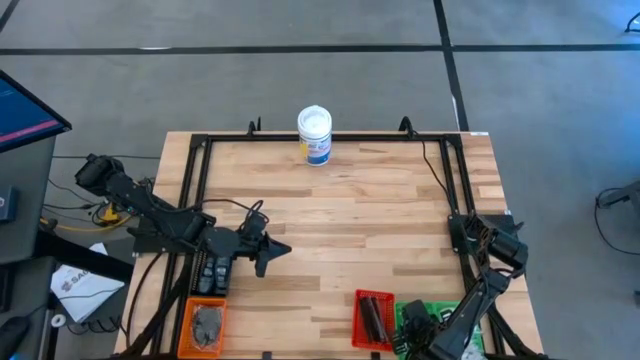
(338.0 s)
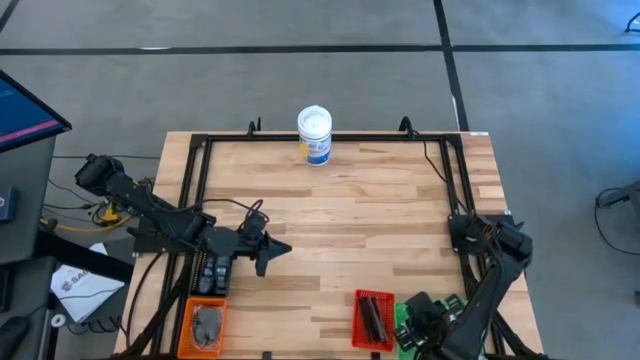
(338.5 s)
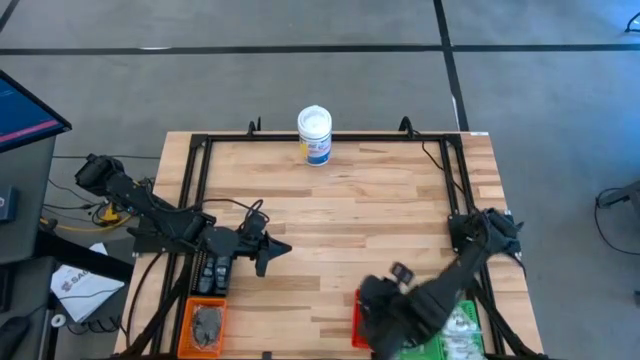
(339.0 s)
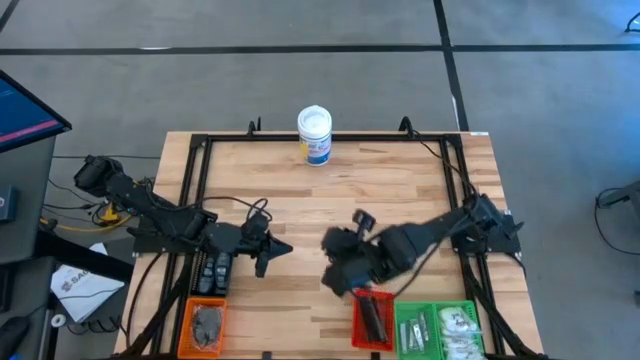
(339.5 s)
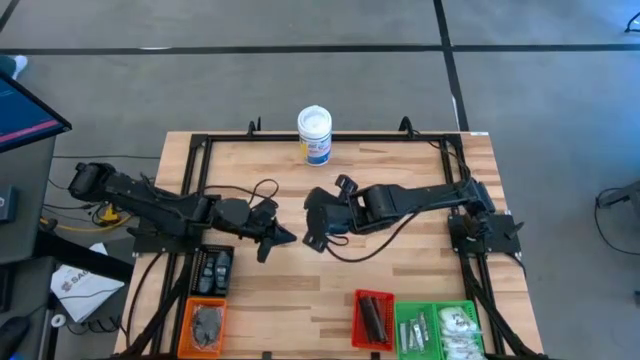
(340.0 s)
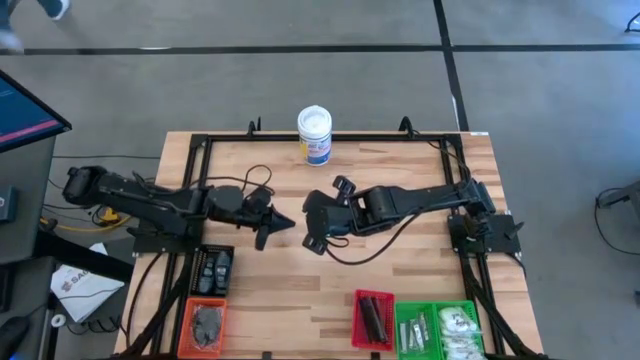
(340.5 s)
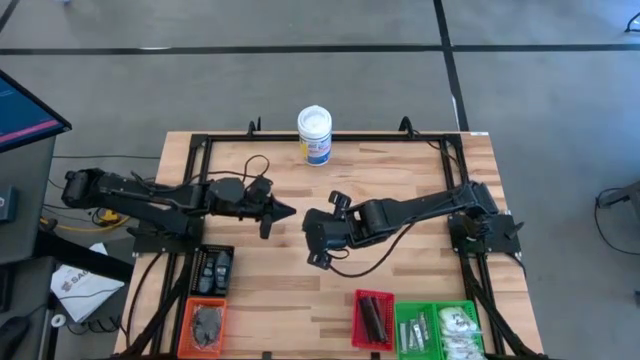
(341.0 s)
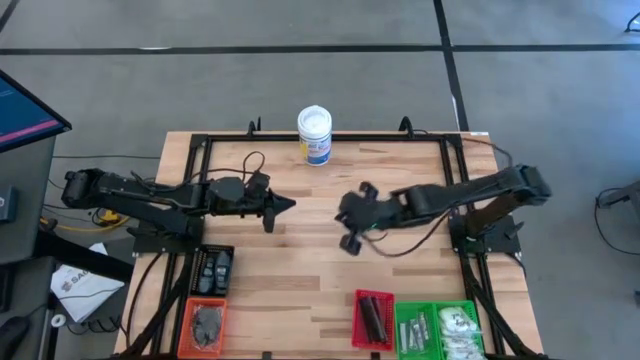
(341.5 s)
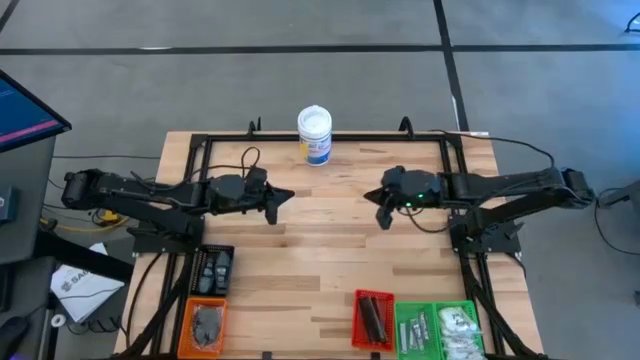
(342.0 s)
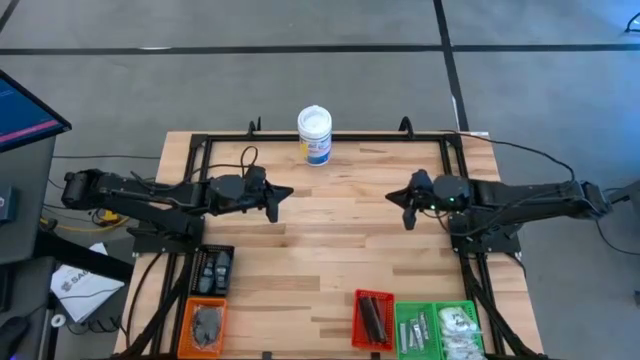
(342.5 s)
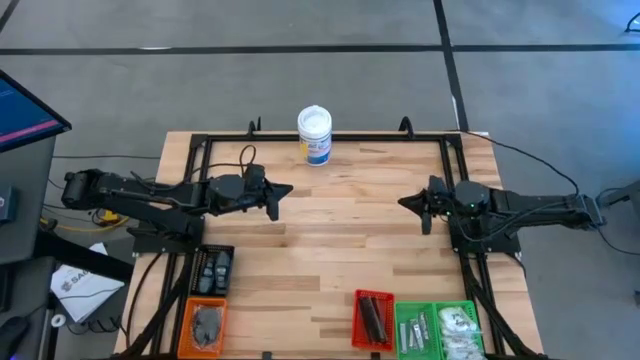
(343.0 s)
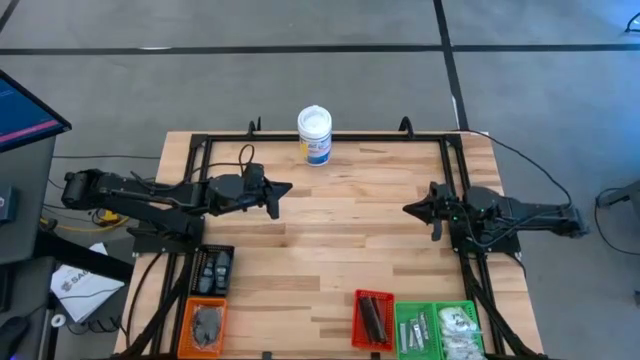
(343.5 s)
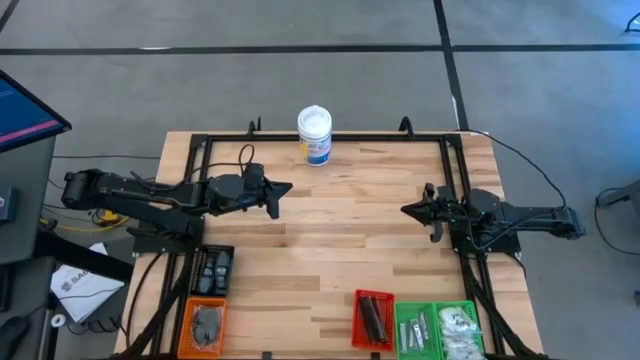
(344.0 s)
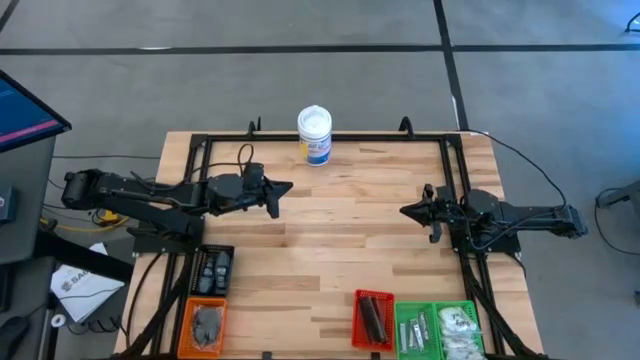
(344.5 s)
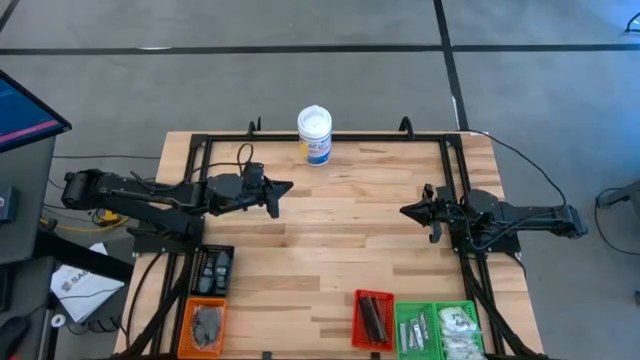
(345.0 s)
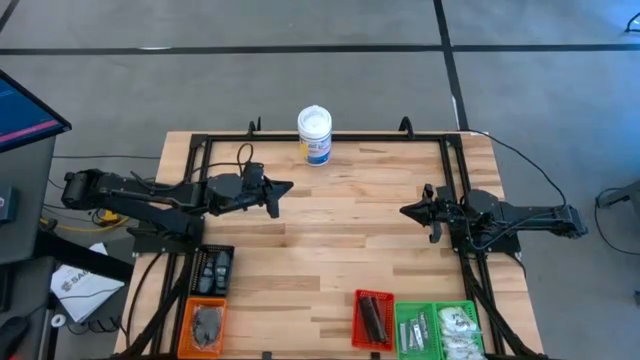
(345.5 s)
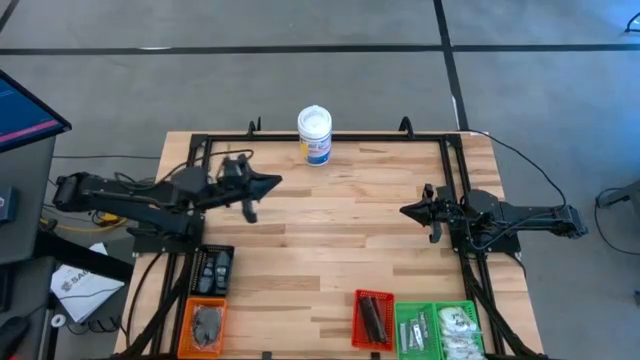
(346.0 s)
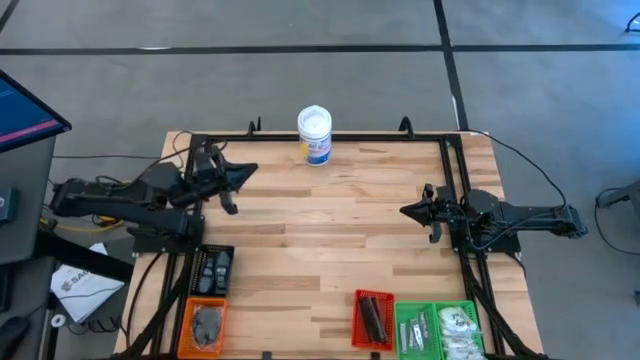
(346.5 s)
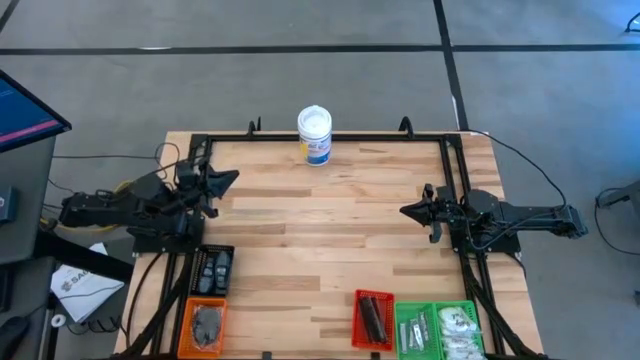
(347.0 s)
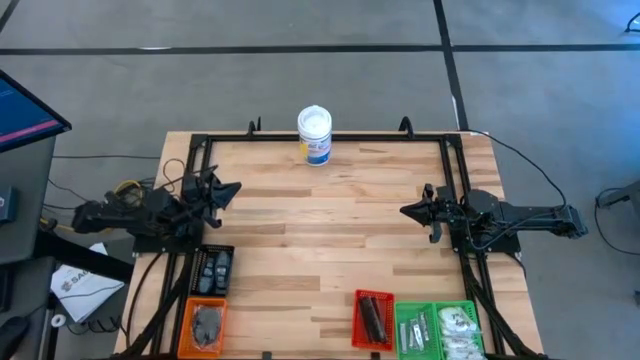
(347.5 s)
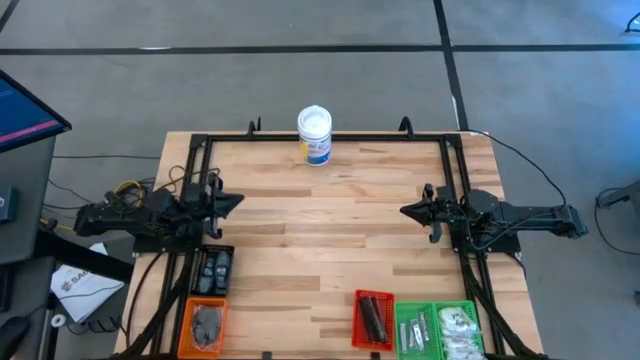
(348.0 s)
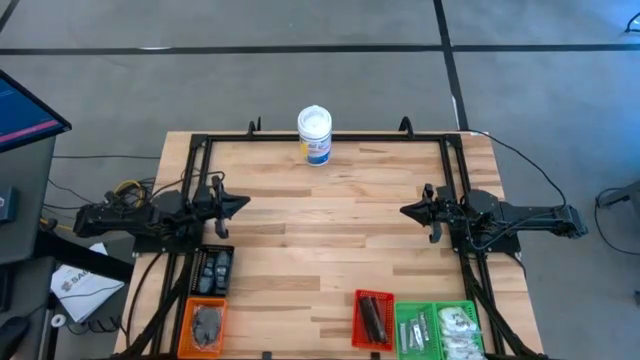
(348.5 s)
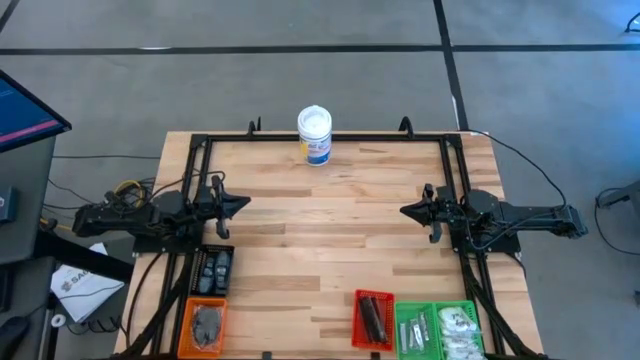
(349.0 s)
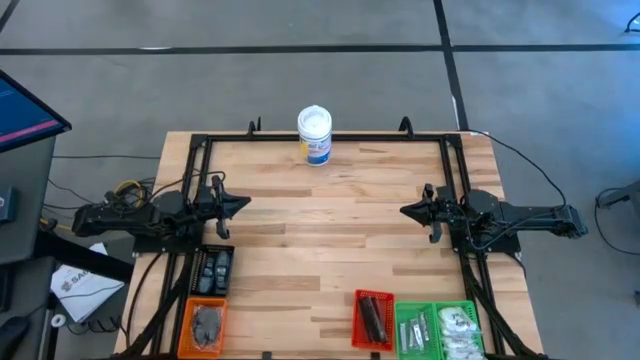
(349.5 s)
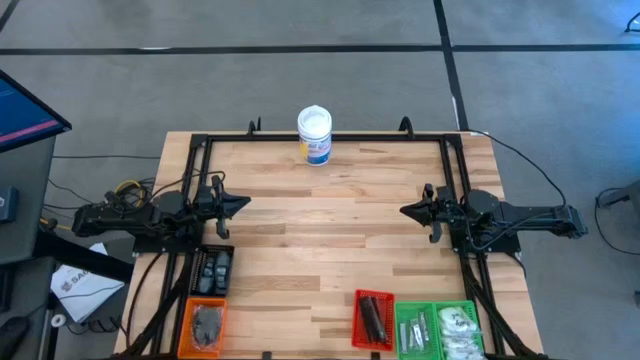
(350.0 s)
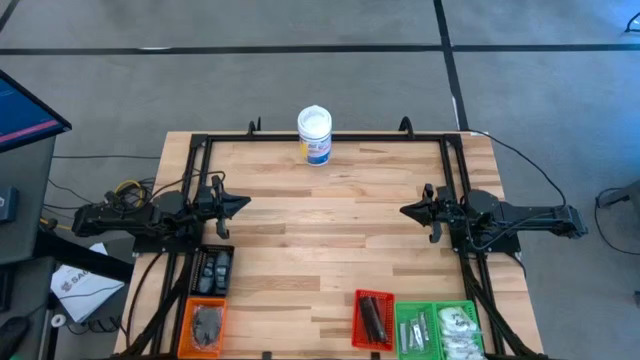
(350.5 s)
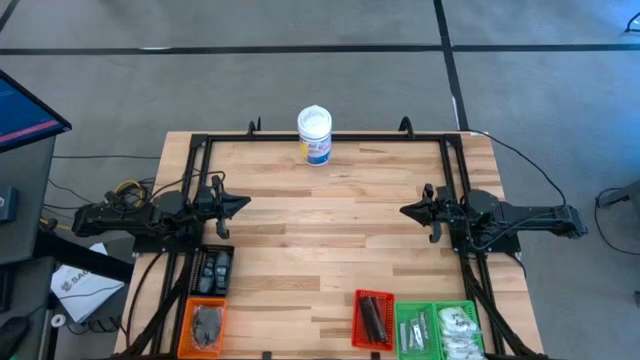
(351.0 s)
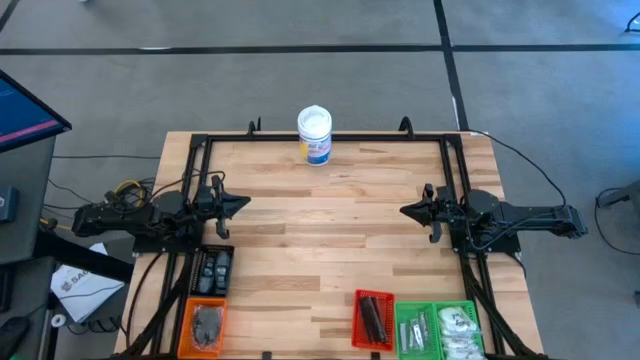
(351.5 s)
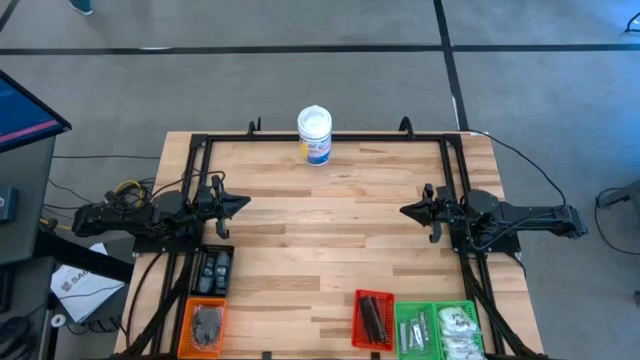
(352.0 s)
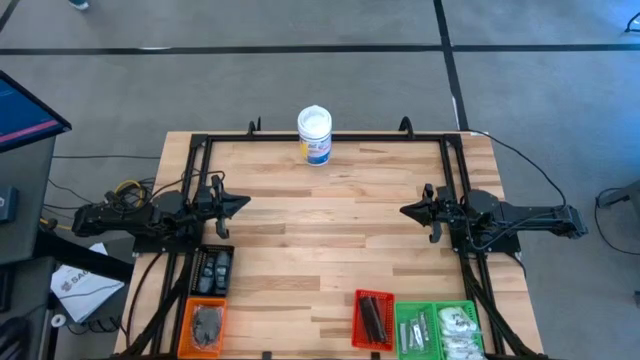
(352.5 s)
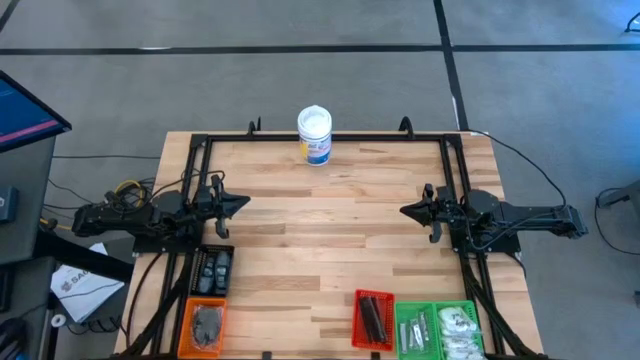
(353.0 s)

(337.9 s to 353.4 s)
Task: Pick & Place Travel size toiletries
Return to Home Position

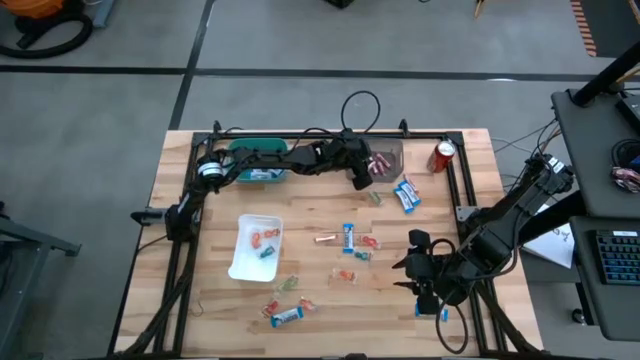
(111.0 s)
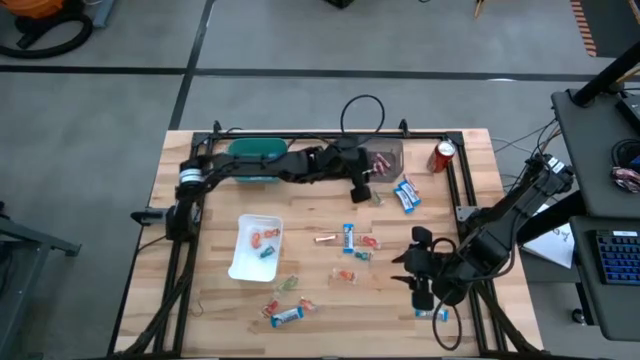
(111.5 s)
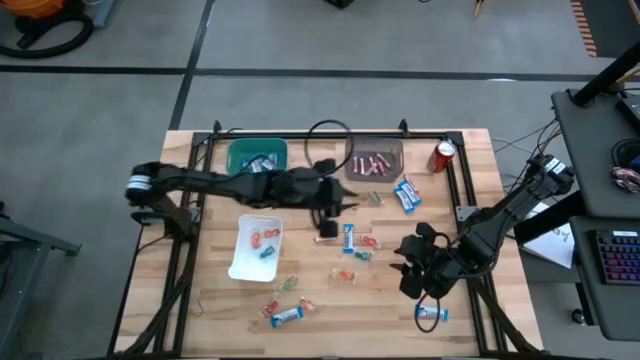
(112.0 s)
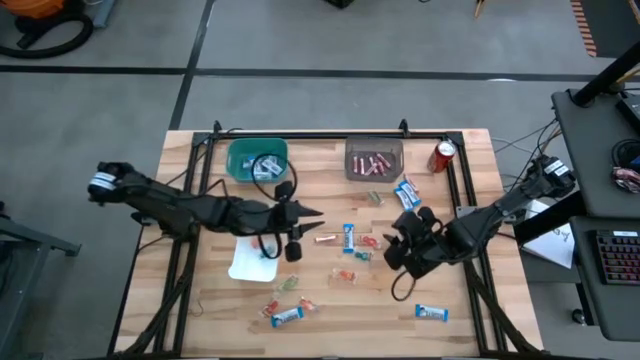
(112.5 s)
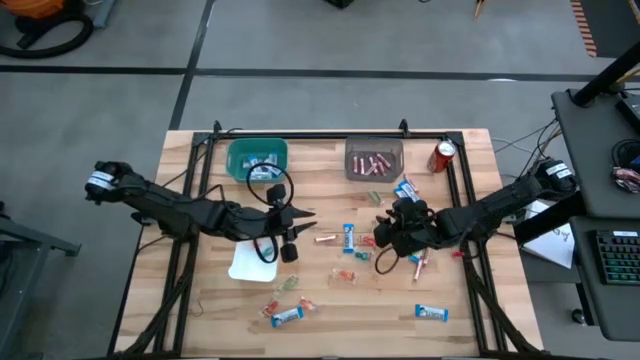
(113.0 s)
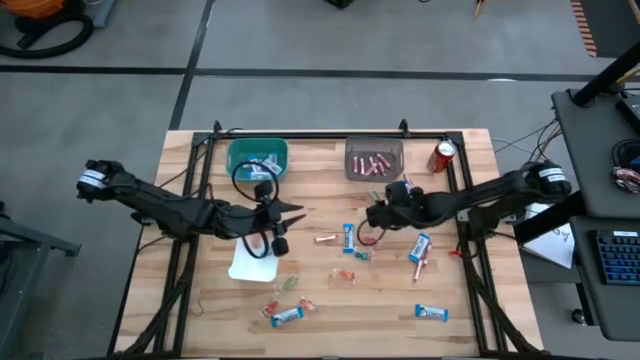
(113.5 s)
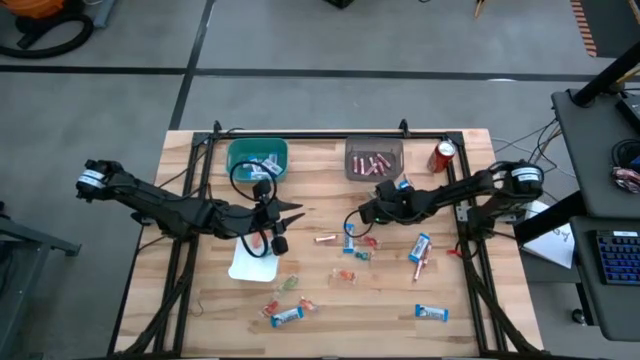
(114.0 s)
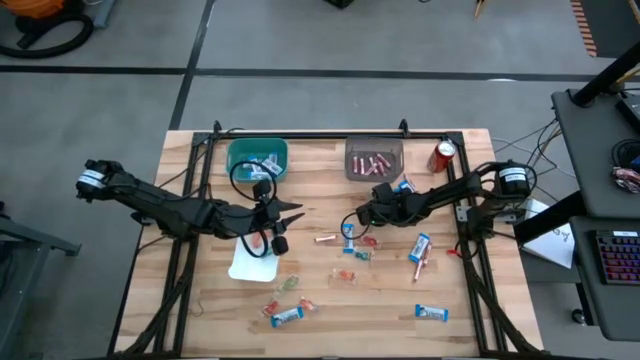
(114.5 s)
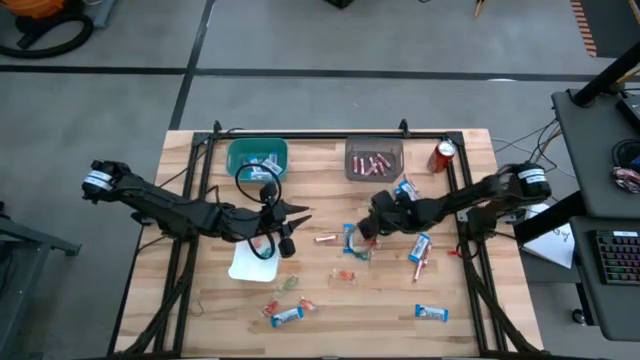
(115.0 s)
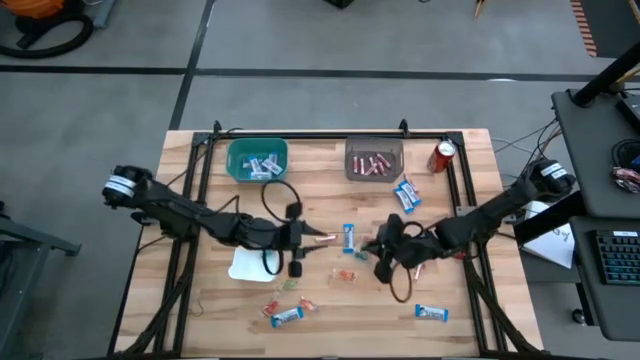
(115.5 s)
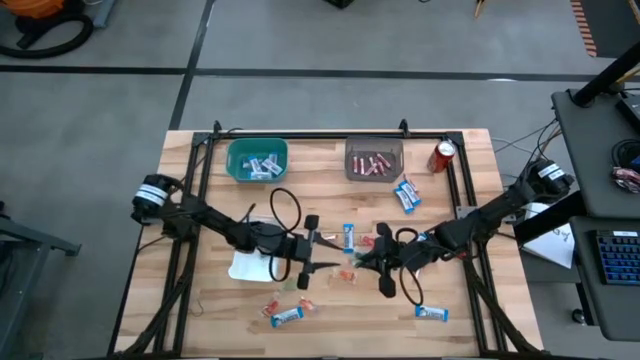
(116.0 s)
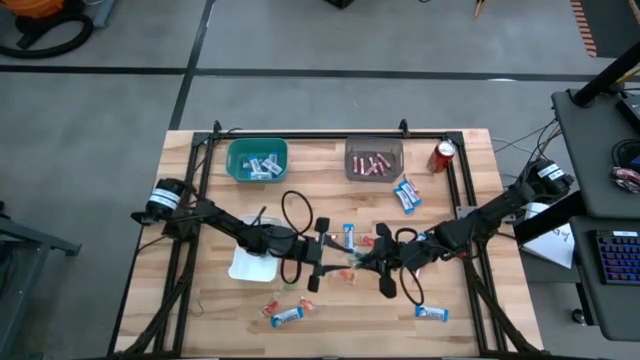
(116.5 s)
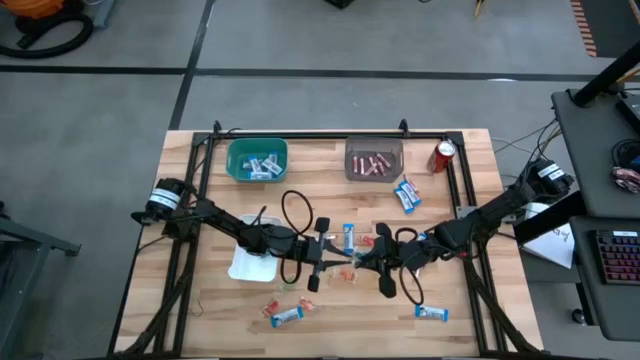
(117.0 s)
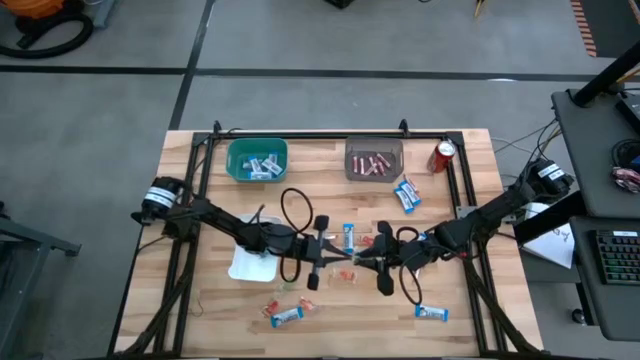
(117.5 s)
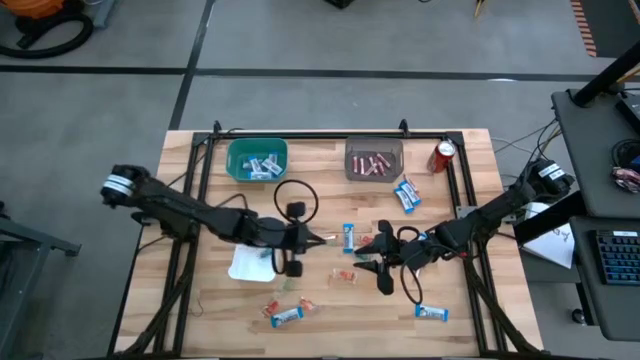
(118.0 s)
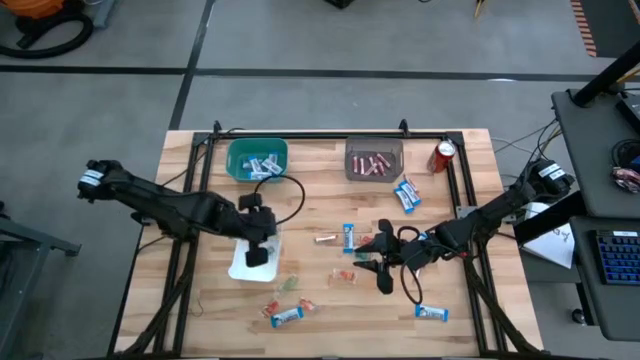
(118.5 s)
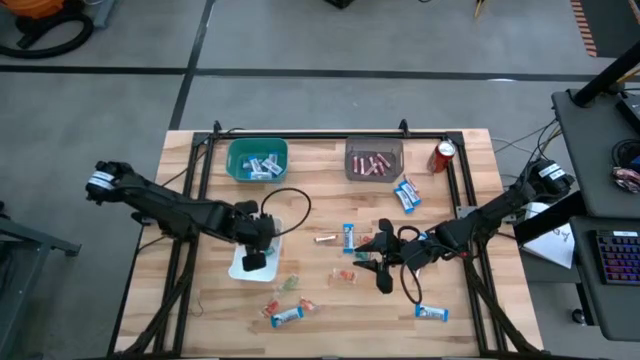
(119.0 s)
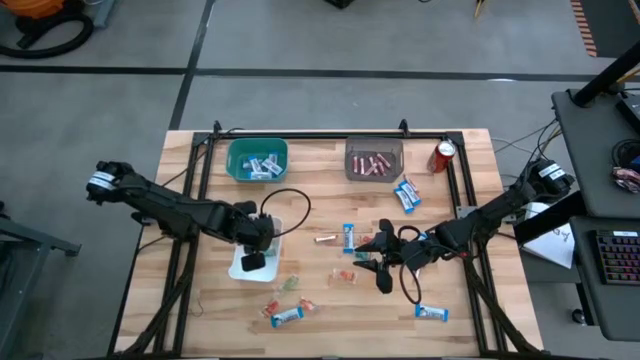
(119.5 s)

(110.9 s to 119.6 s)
Task: Sort candy
Put the green gummy candy into the white bin
